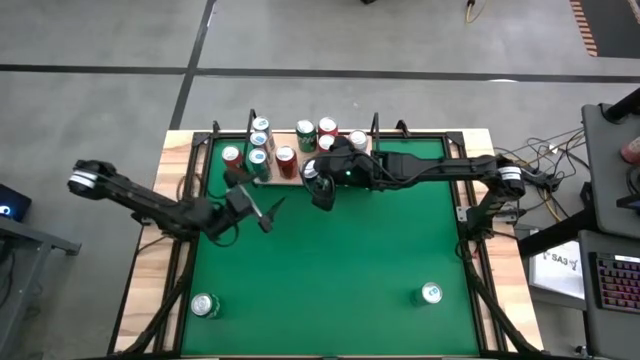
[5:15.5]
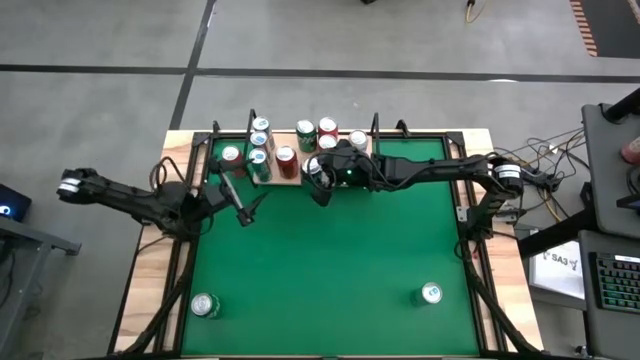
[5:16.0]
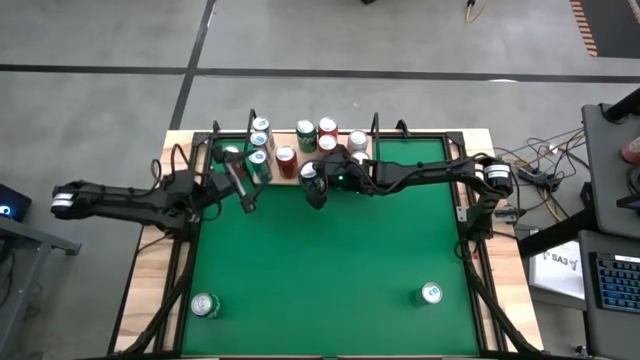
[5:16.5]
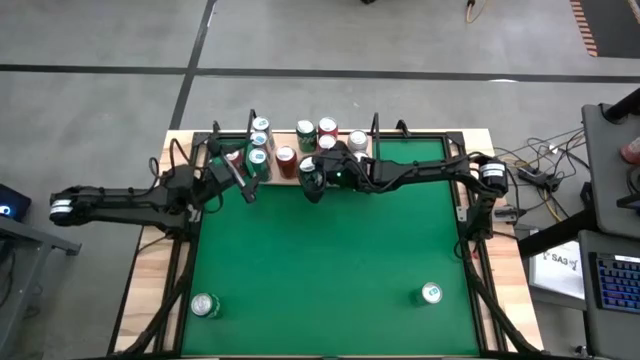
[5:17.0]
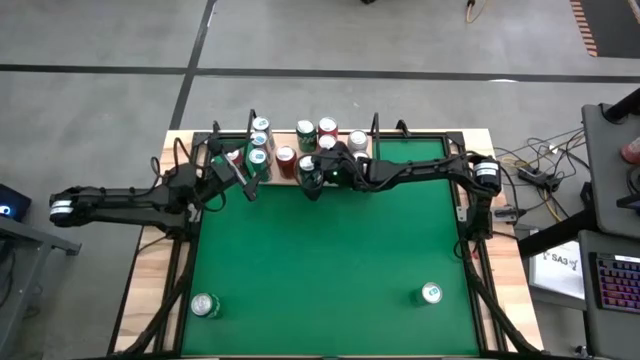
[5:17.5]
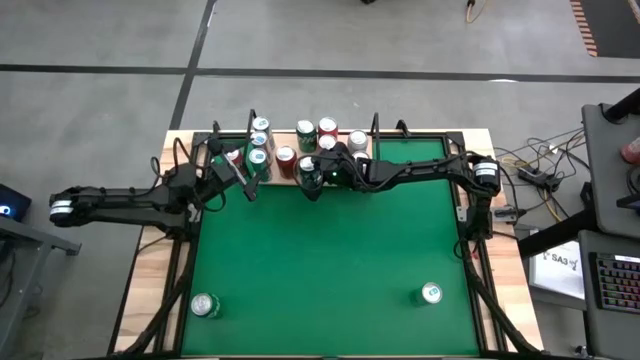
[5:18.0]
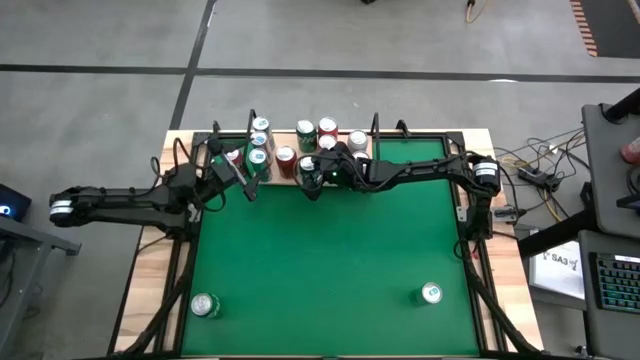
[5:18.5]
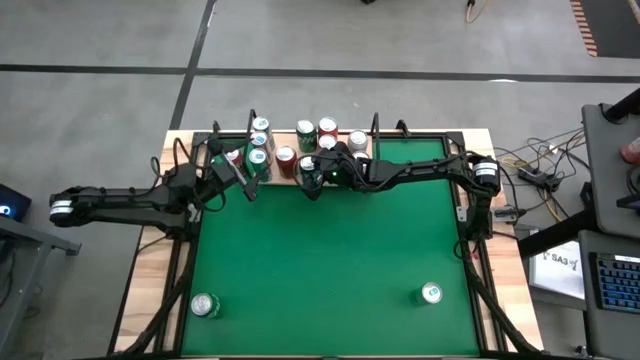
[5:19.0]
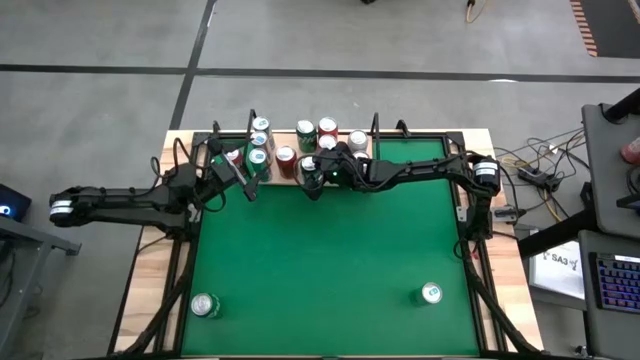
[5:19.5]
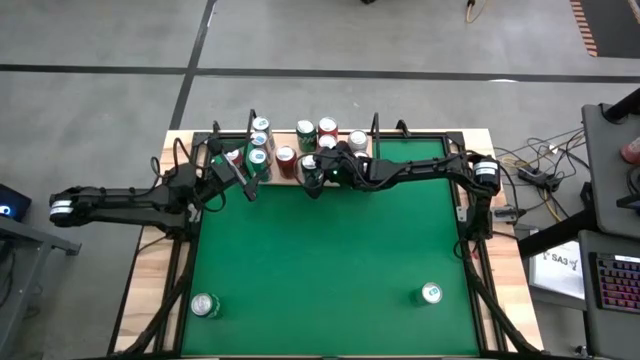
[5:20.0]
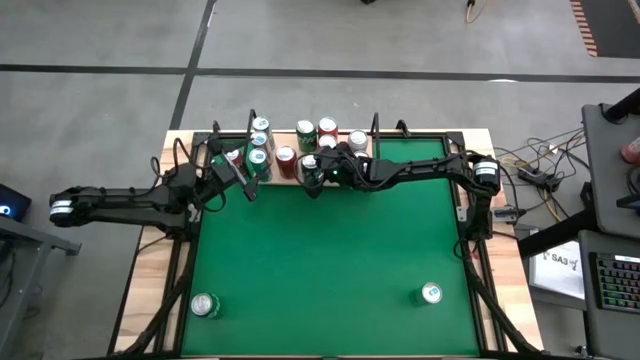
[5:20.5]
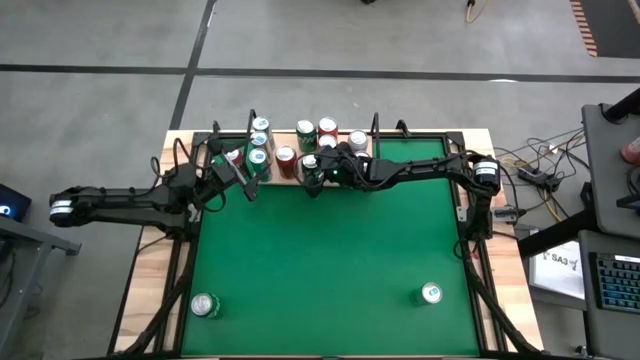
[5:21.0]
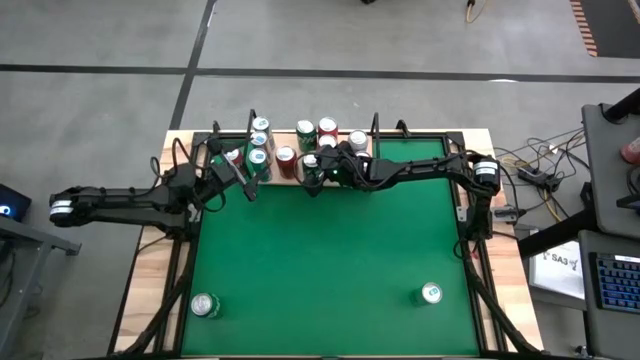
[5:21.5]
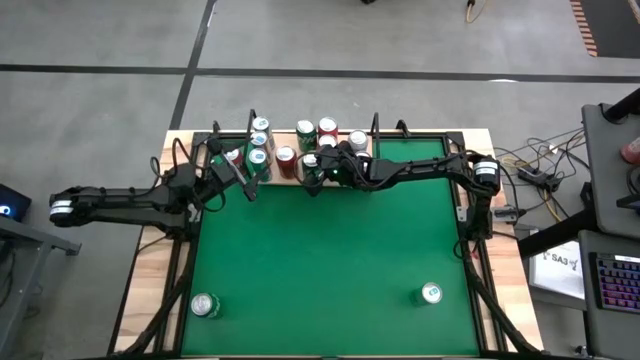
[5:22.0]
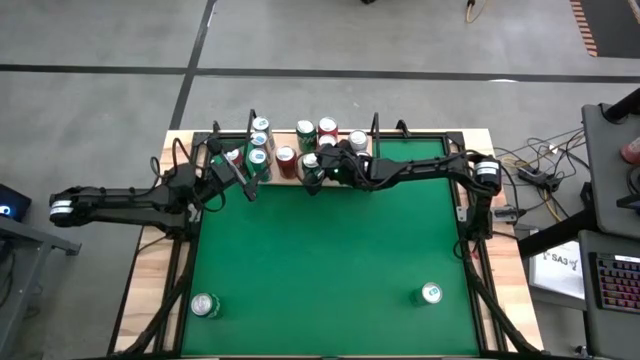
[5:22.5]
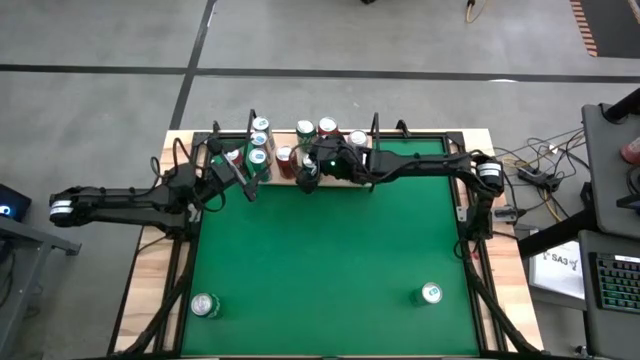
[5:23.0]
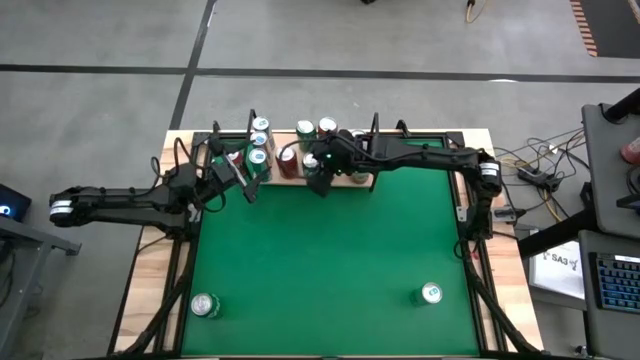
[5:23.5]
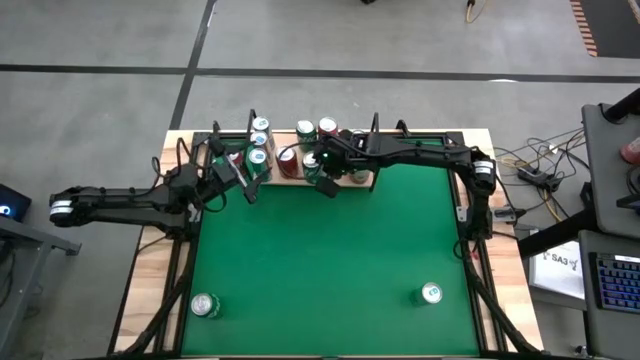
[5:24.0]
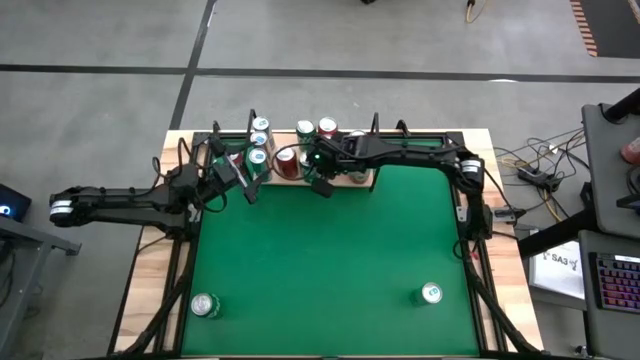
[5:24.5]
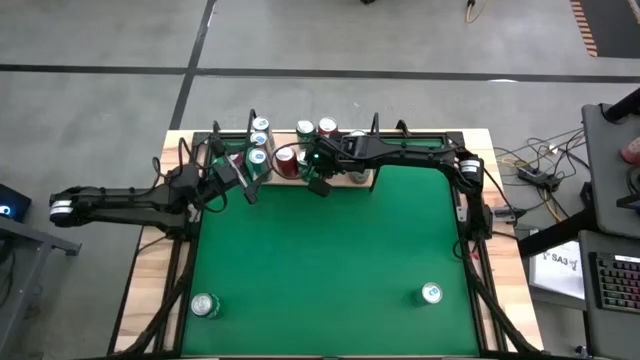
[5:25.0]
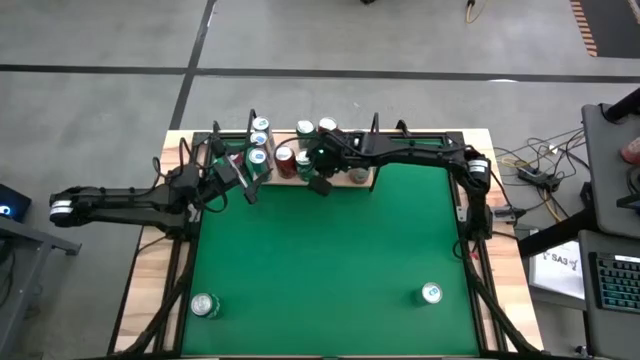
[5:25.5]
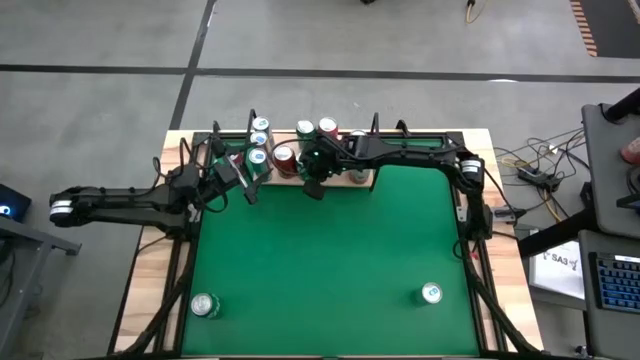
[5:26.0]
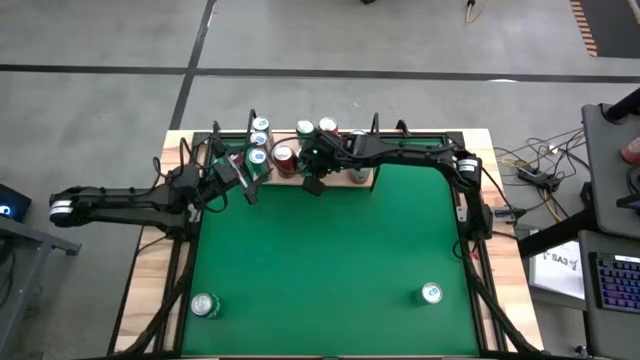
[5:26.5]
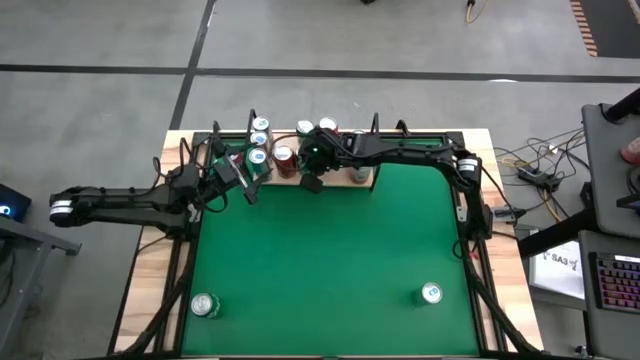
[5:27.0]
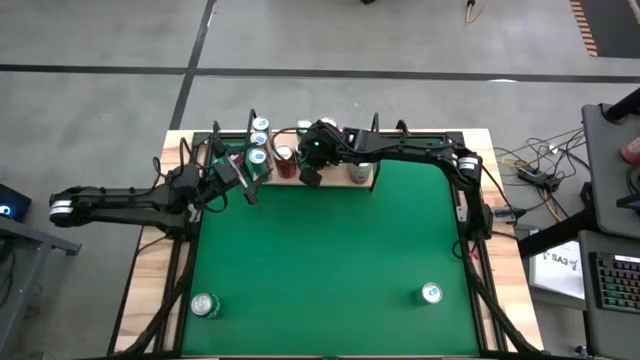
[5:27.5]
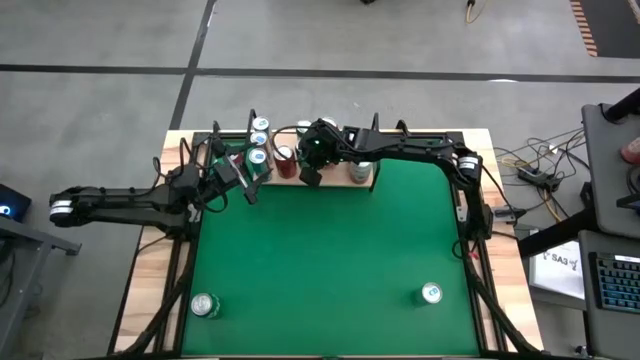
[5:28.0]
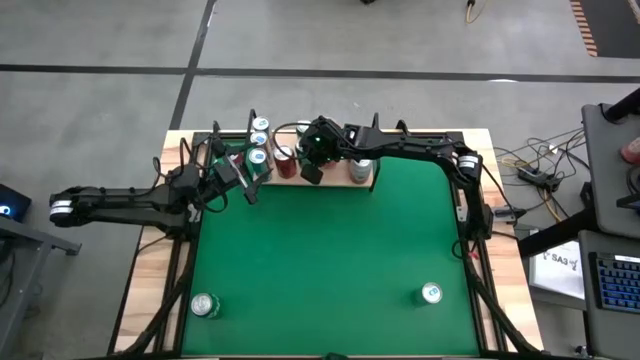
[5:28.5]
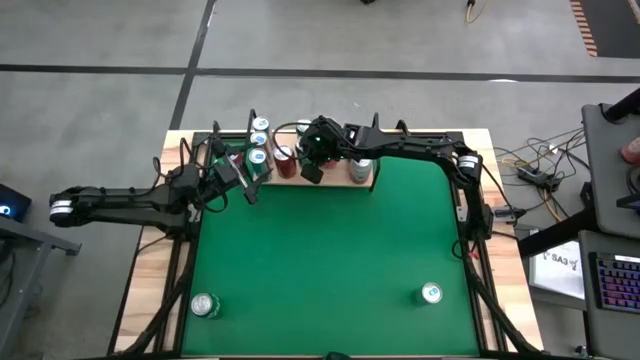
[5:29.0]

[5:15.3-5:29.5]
Task: Pick and place cans onto a shelf
Put the right green soda can on the shelf aligned with the other green soda can

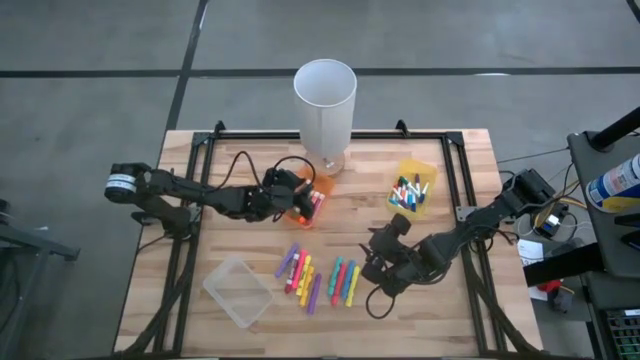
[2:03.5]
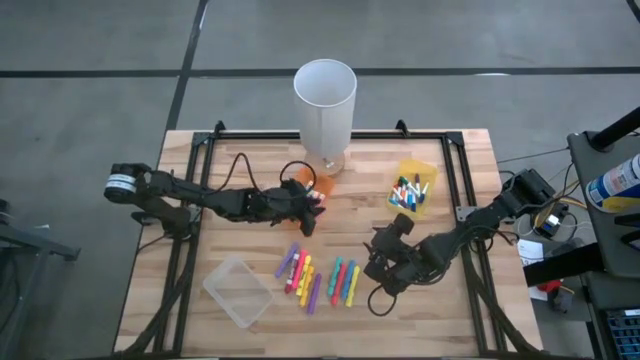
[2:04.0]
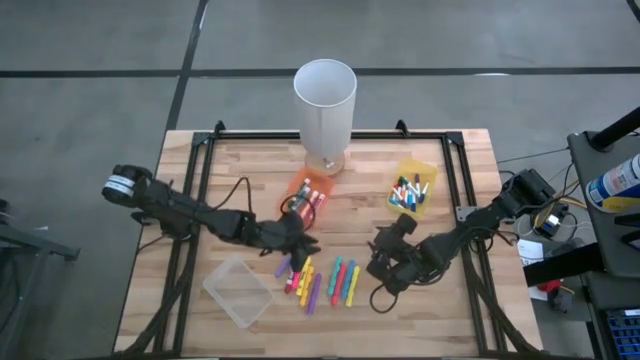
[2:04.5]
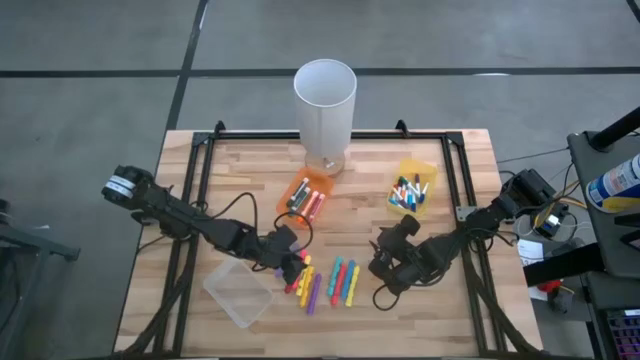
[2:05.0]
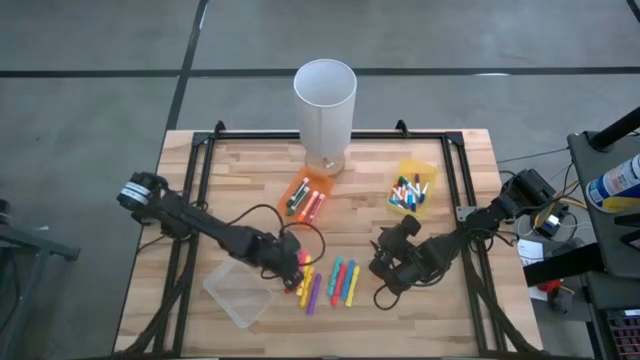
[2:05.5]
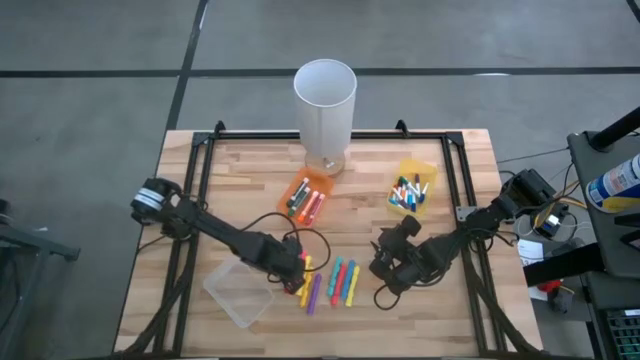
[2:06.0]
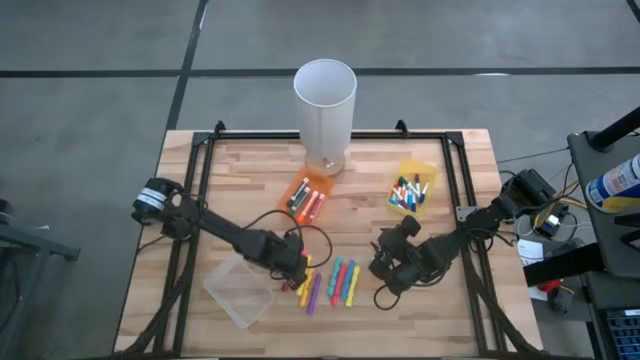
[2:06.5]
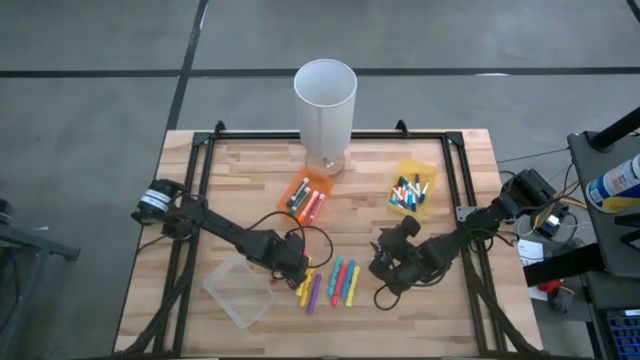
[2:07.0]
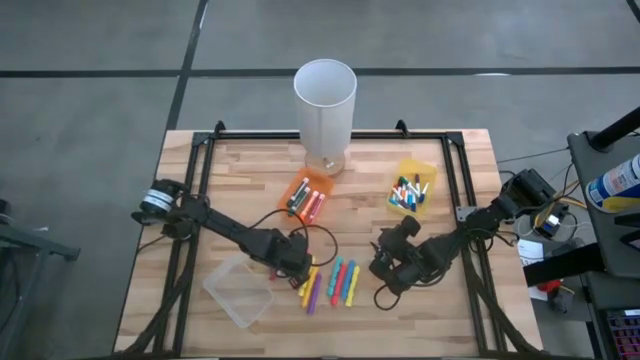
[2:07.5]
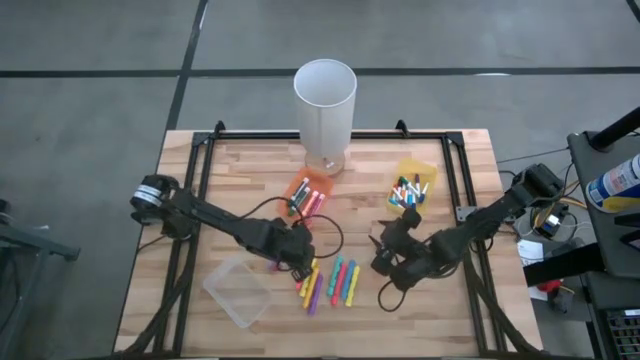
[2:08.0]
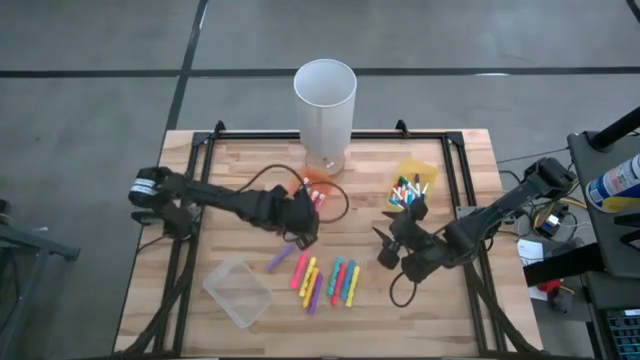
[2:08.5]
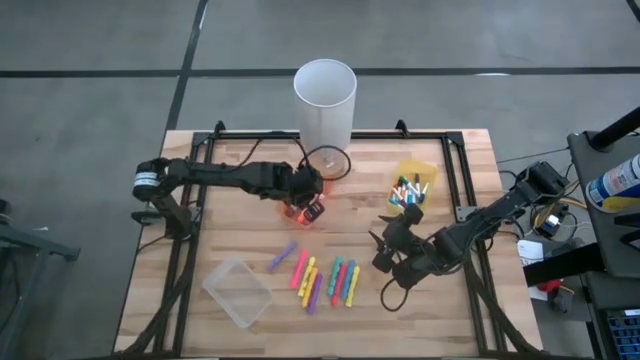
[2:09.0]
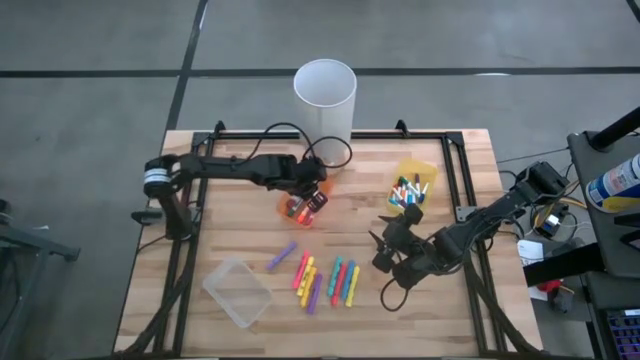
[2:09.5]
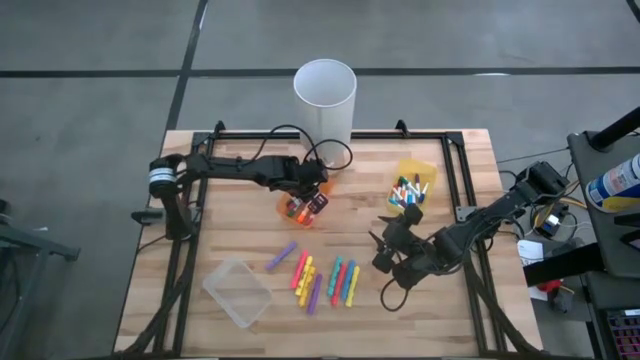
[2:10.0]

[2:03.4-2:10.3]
Task: Pick & Place Markers
Put the large red marker pen into the orange bin
